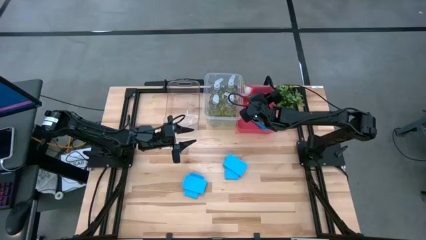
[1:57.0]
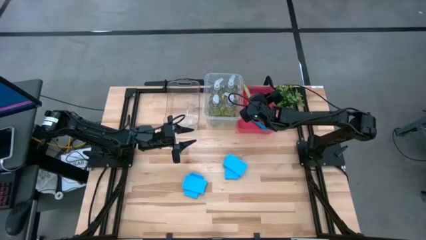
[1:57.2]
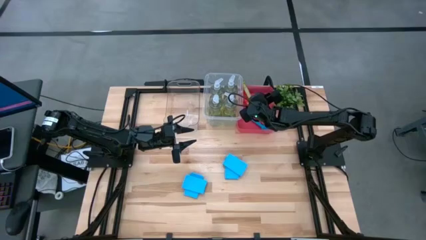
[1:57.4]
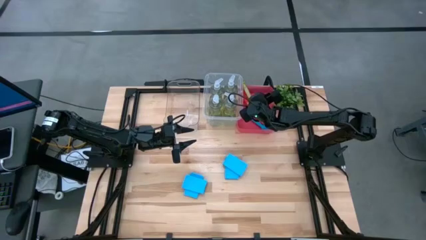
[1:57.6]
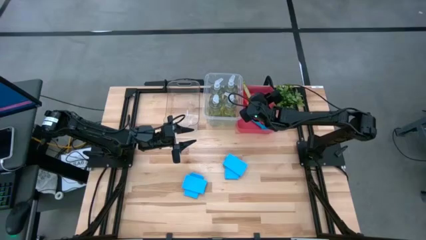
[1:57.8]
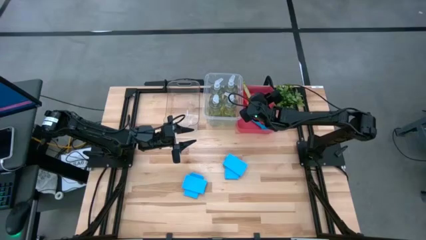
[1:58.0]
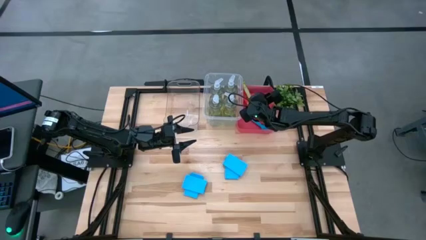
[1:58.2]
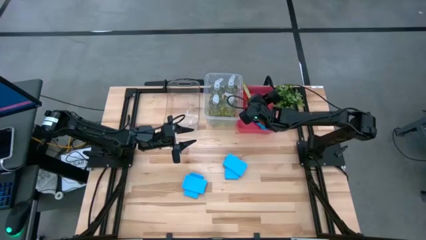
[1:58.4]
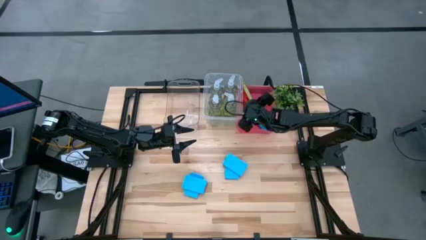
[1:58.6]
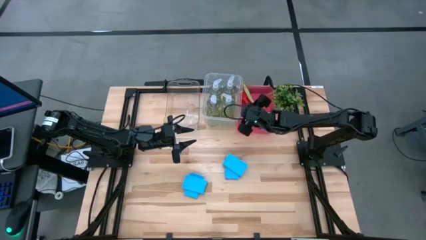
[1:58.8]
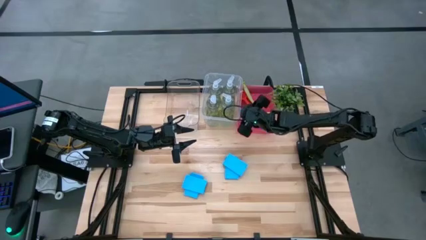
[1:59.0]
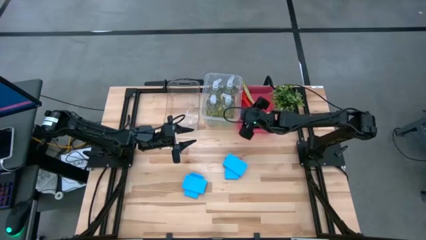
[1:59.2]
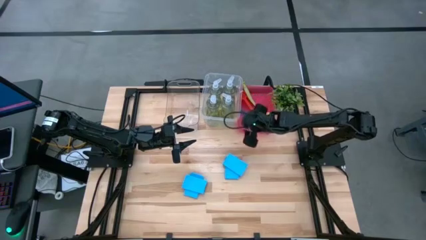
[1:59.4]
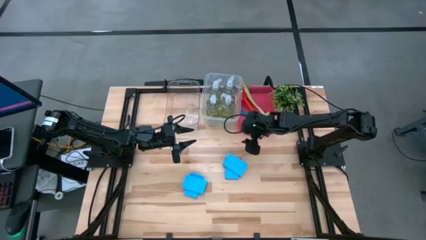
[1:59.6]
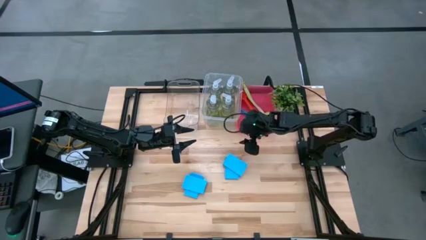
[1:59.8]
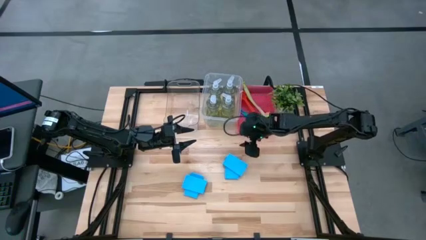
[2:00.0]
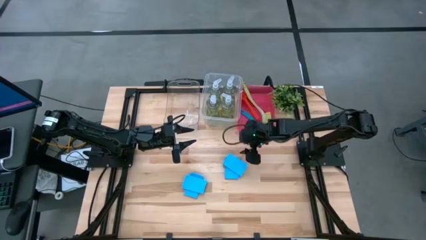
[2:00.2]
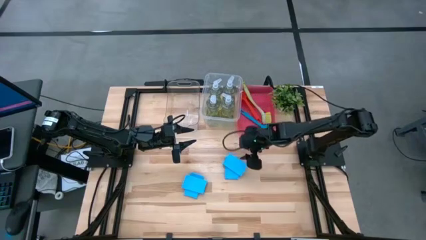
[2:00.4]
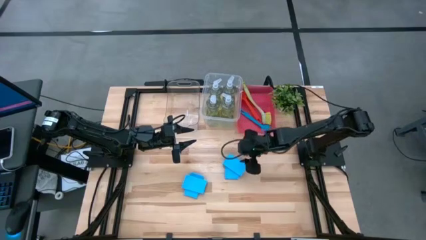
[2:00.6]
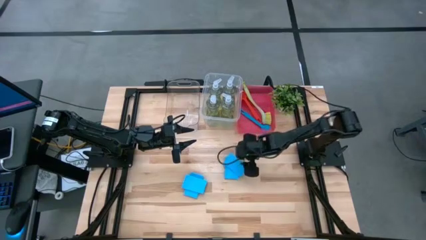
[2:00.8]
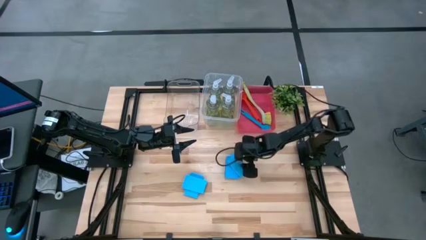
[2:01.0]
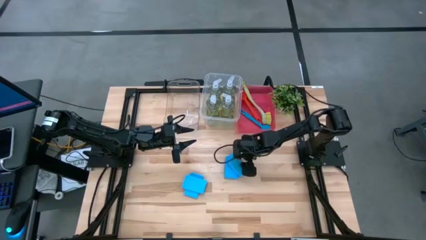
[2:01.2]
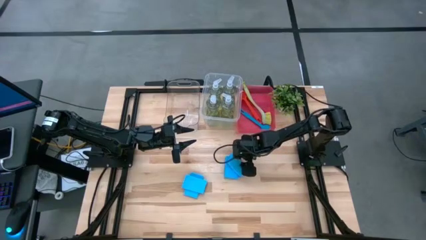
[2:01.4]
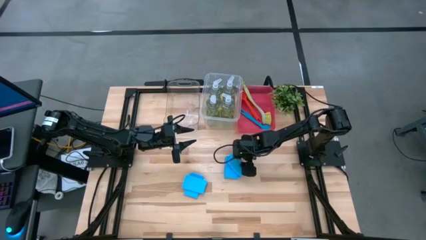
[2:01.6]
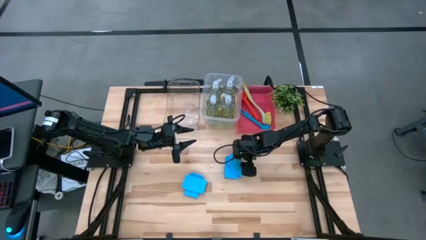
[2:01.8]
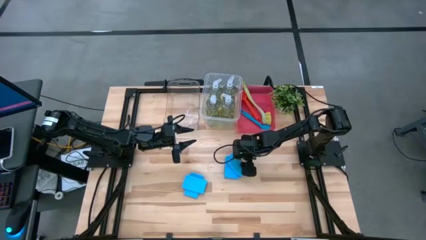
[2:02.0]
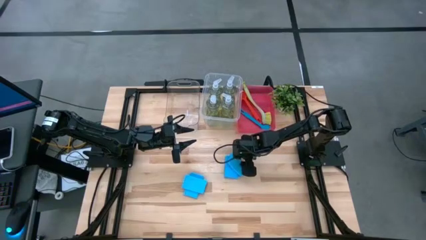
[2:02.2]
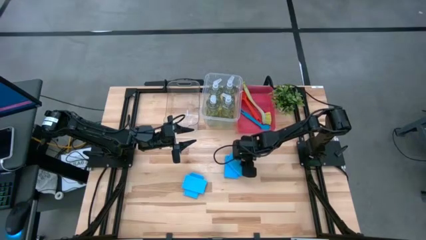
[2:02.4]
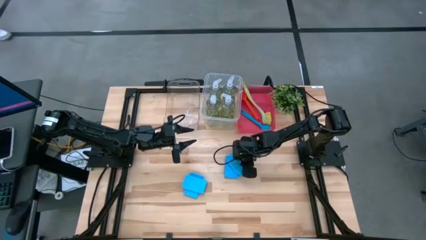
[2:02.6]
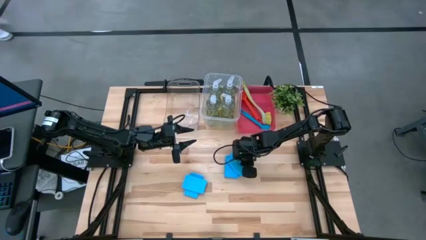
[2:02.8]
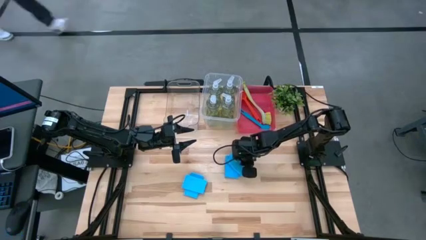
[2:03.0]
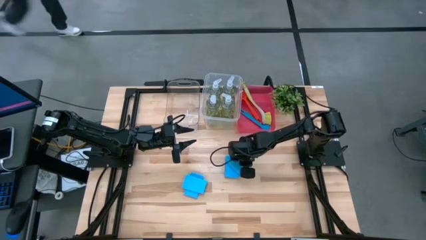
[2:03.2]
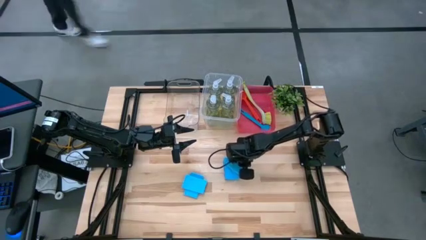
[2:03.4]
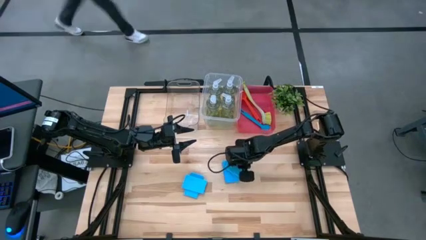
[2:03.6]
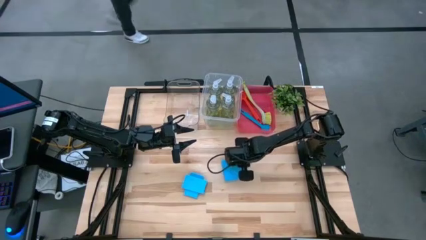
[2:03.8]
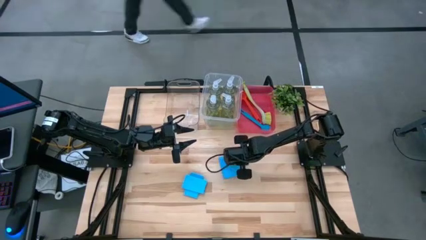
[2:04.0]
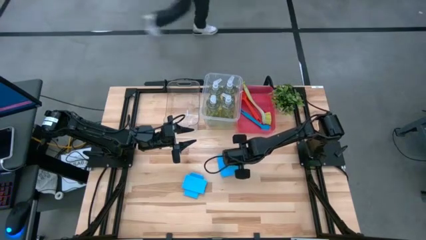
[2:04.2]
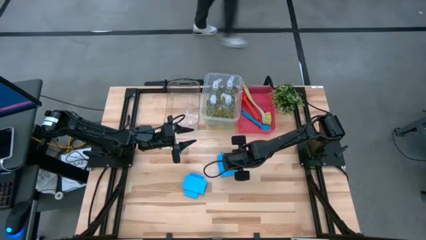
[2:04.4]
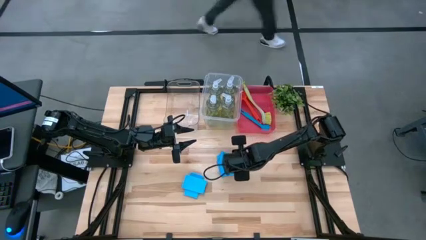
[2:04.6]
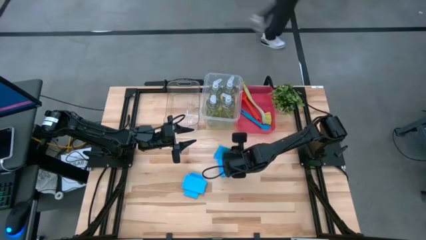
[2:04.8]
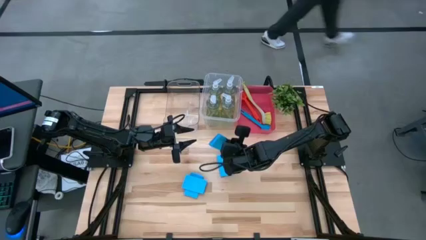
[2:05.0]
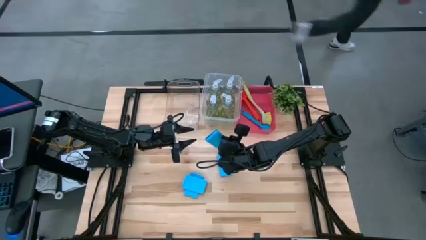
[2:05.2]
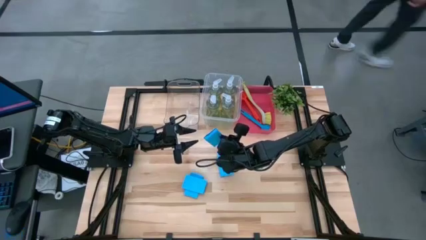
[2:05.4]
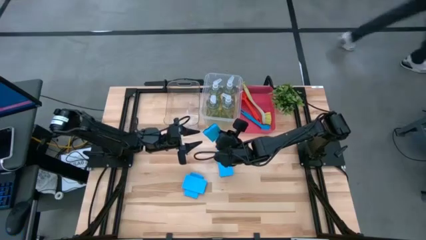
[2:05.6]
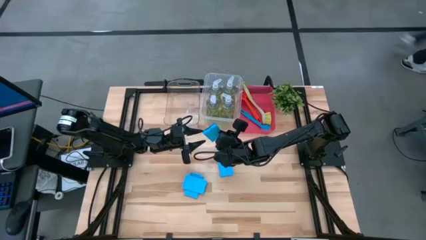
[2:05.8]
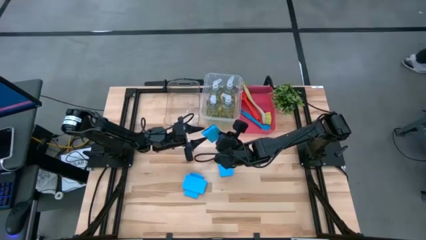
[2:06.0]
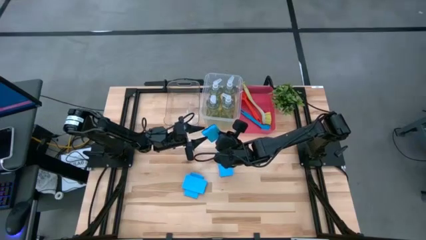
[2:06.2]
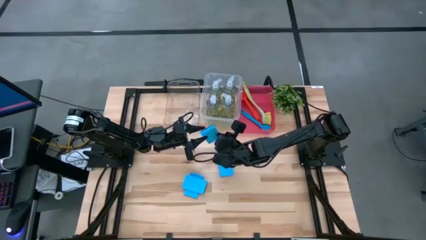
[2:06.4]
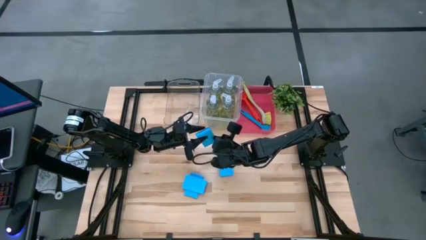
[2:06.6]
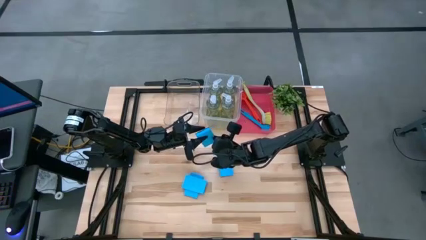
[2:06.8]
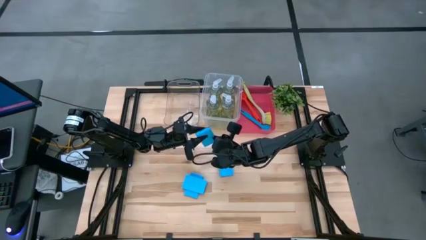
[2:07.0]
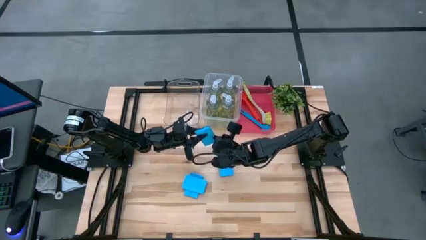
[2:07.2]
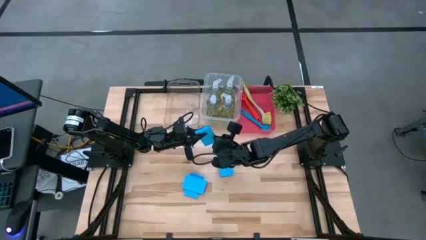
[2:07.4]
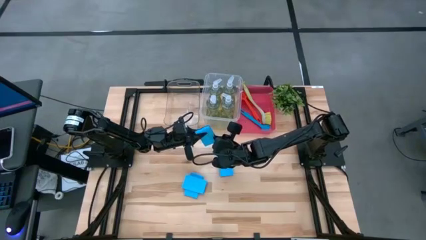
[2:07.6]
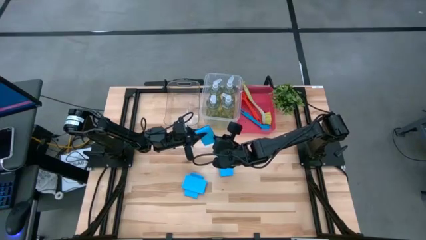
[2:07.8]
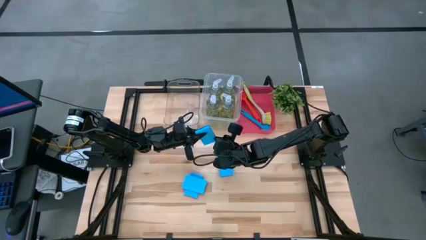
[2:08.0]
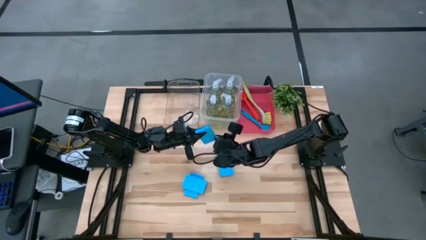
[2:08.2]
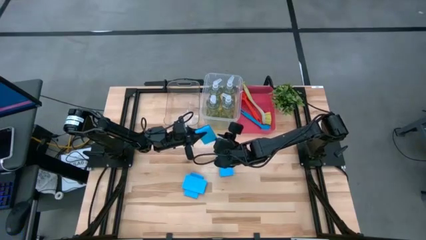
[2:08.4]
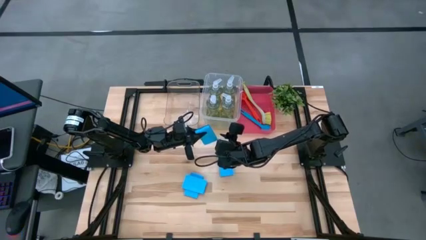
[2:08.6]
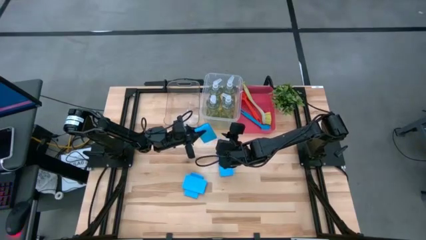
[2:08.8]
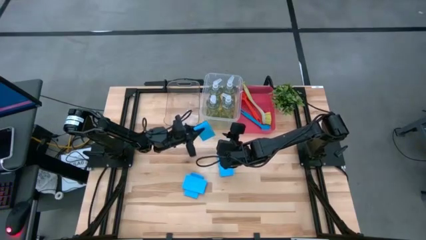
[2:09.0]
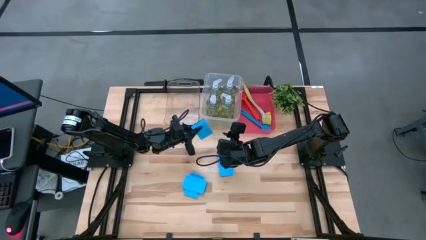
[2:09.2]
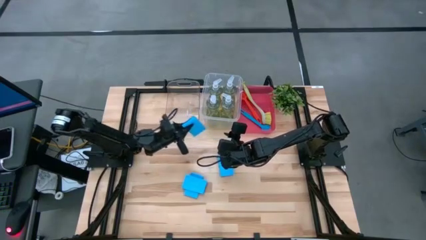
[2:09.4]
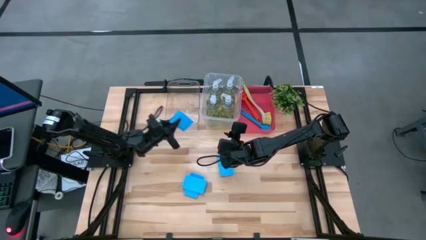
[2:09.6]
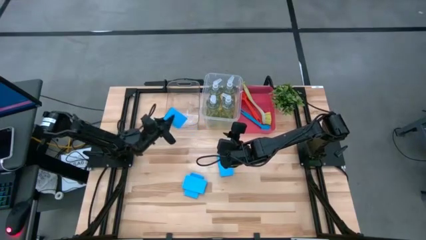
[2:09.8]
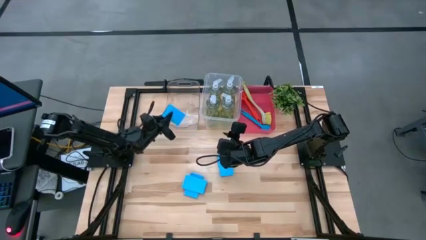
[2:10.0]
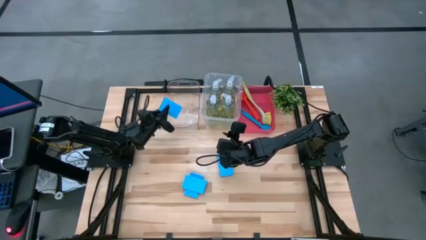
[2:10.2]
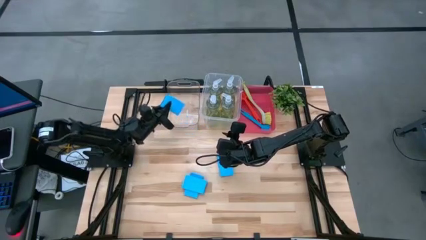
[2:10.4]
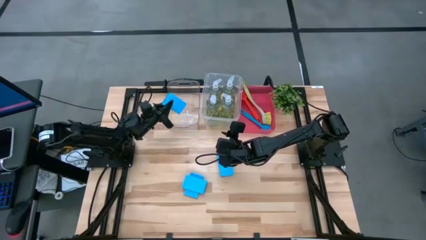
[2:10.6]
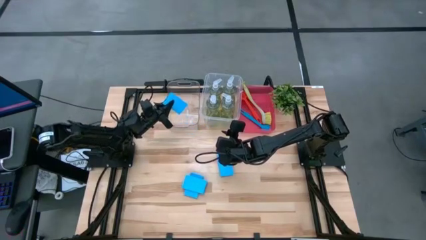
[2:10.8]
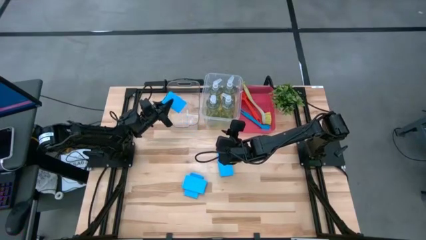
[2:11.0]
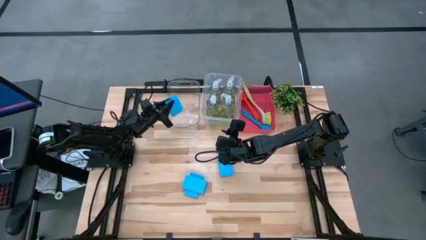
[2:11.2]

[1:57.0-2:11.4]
Task: Pick & Place Kitchen Sink Supplies
Put the blue sponge into the transparent bin

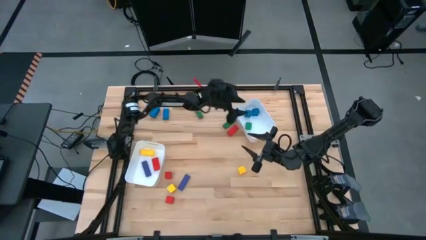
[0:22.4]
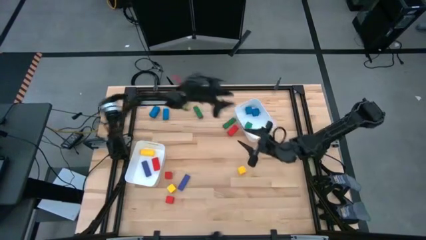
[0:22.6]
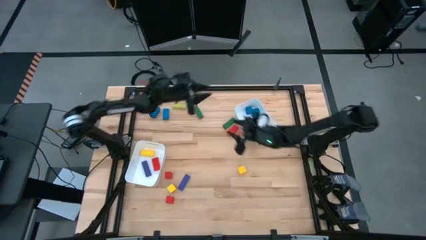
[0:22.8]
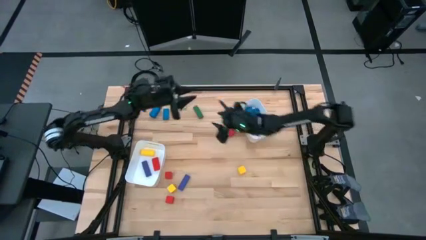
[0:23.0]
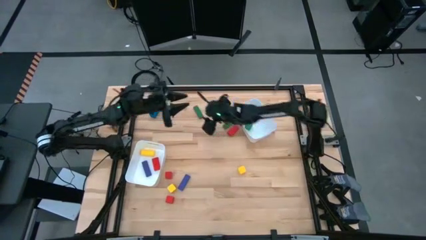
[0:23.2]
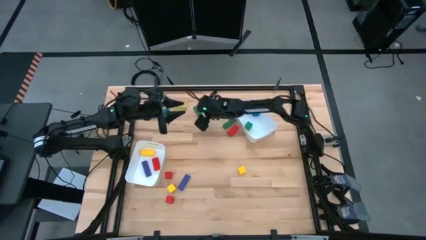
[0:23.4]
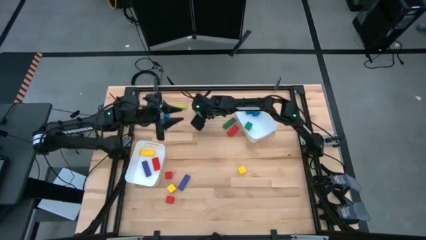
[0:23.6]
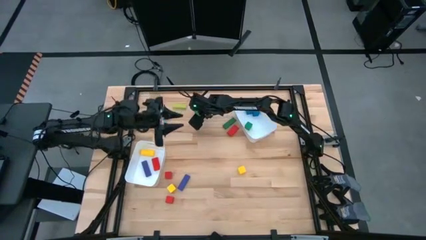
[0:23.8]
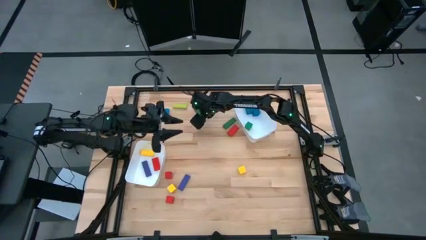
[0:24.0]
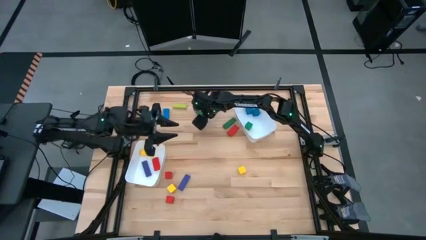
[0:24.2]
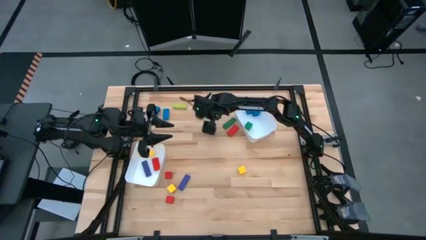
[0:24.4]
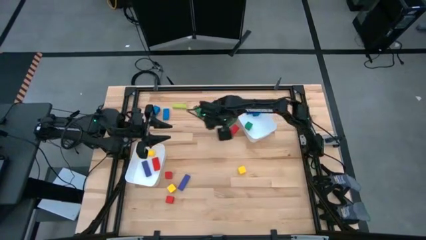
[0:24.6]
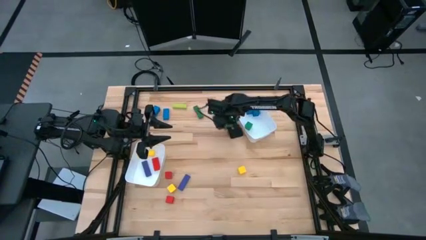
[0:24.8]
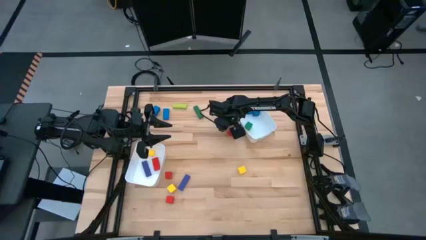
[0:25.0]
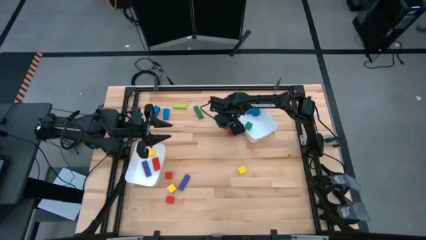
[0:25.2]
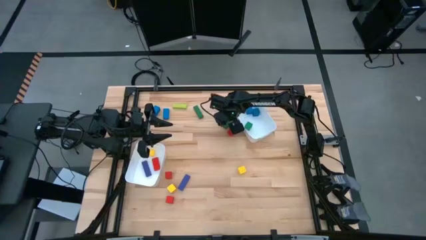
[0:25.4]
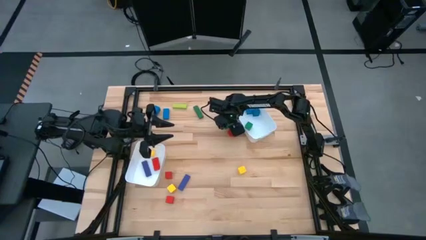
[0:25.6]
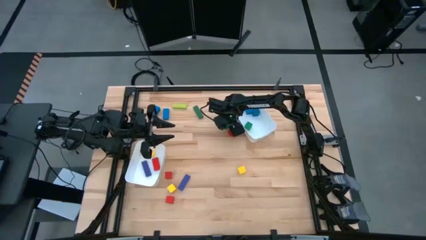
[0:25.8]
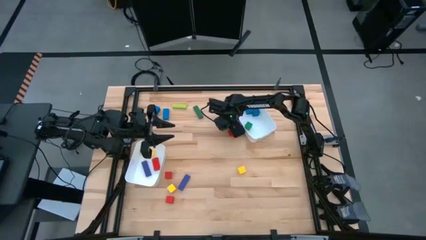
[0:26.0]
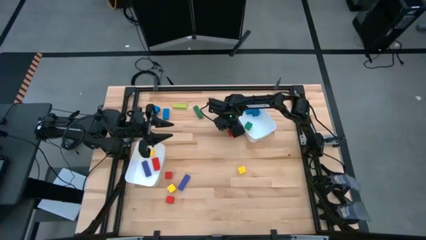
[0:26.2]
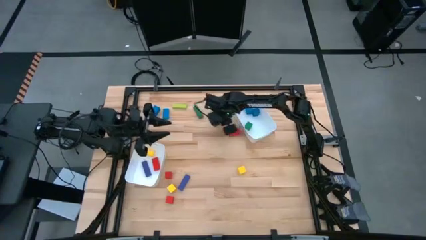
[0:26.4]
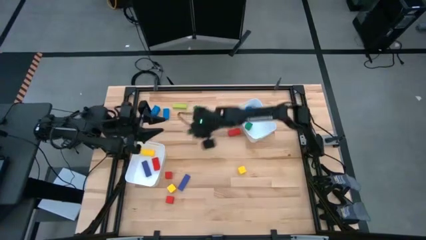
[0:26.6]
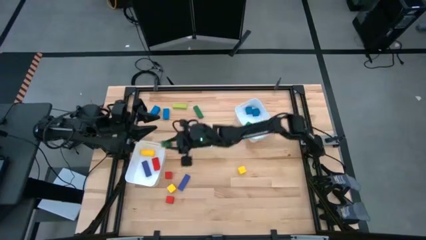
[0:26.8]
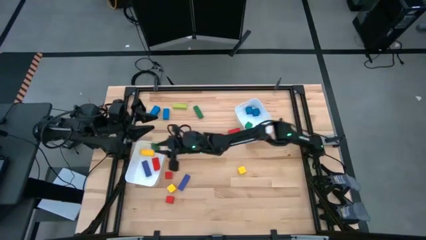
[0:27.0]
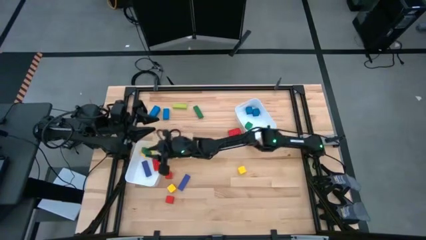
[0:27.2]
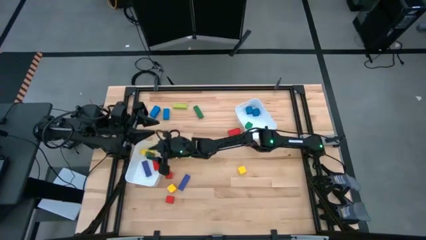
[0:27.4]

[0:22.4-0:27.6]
Task: Sort blocks by size
Put the large green block into the left white bin
